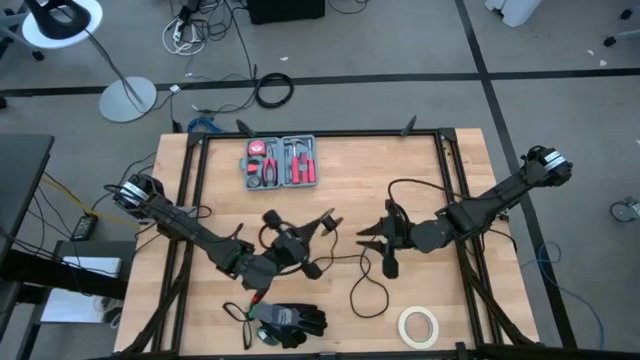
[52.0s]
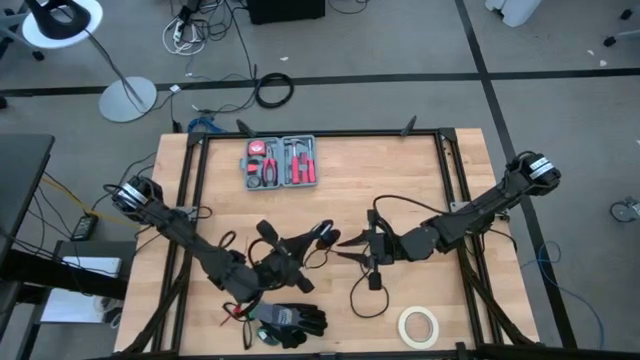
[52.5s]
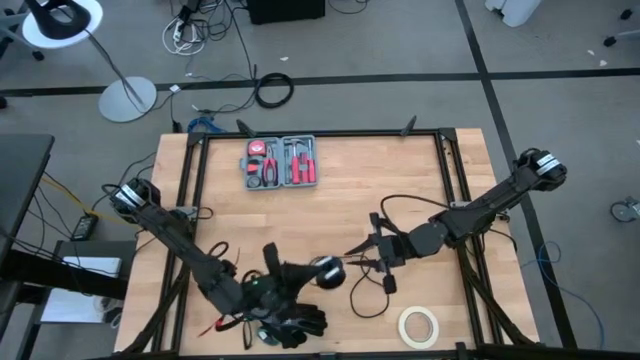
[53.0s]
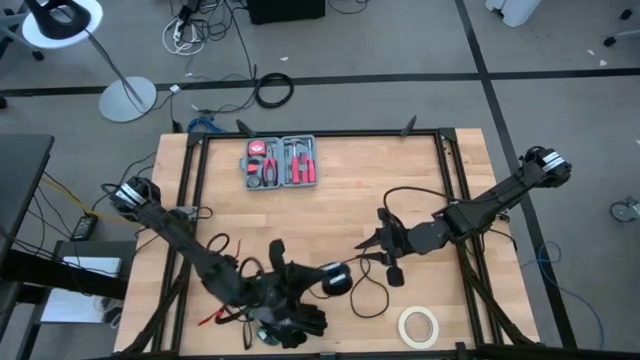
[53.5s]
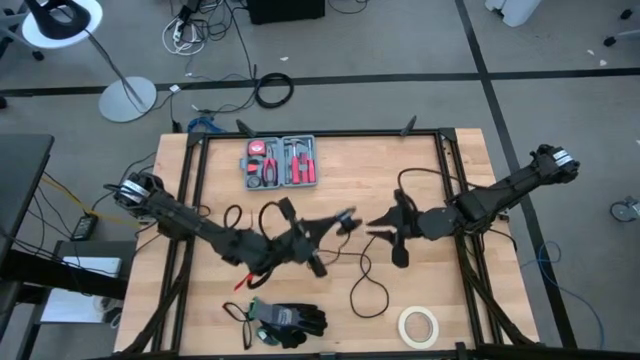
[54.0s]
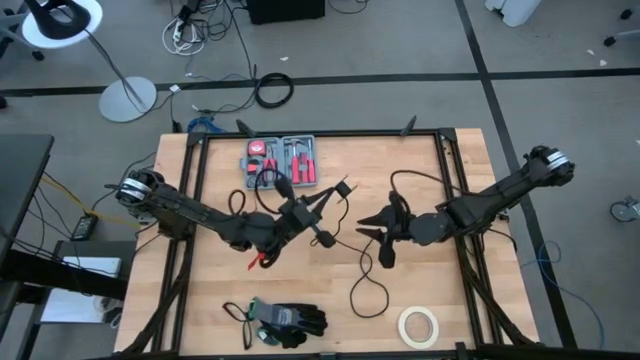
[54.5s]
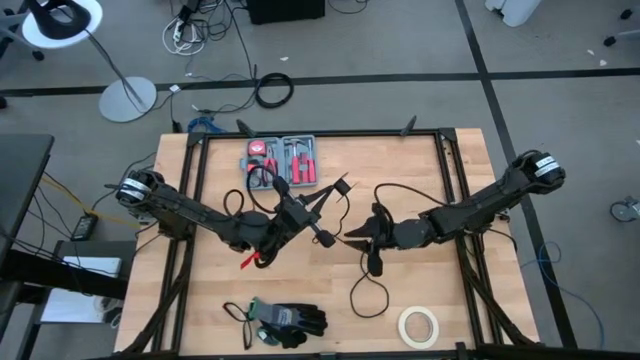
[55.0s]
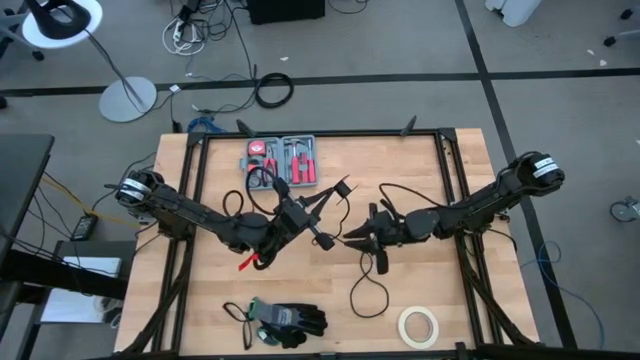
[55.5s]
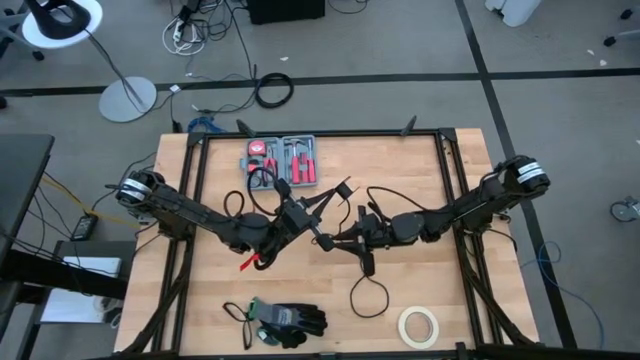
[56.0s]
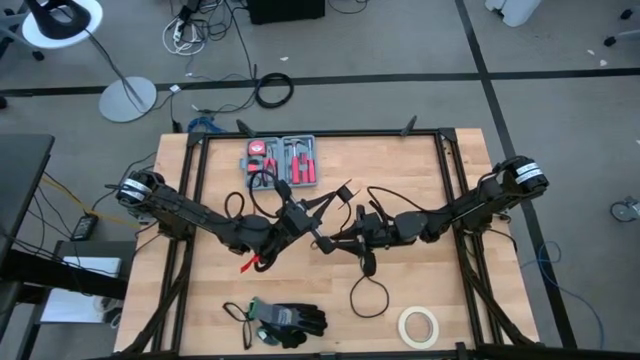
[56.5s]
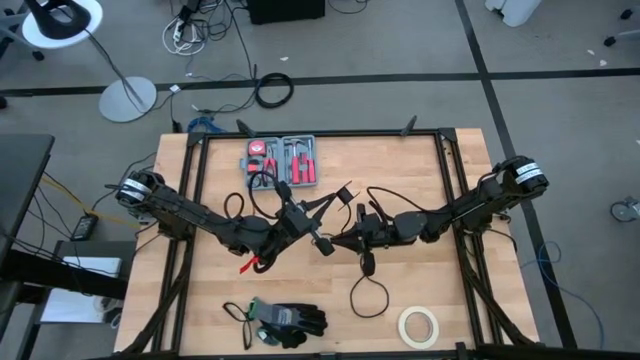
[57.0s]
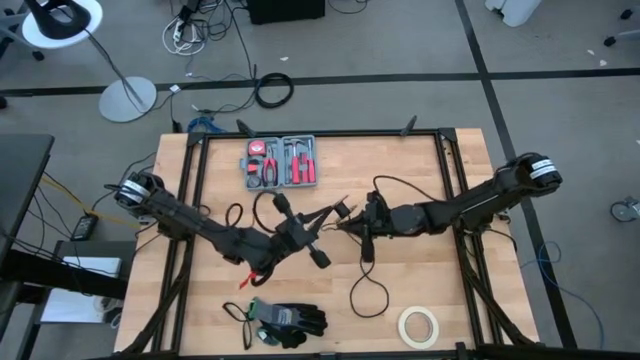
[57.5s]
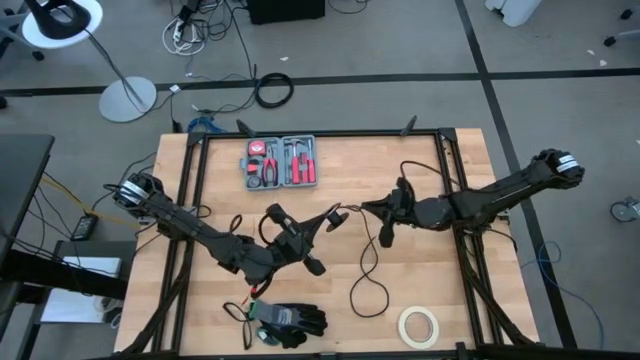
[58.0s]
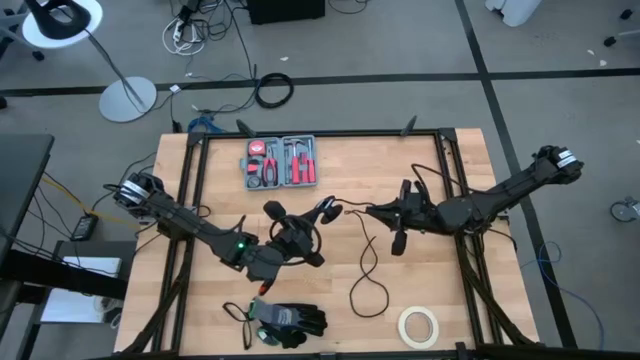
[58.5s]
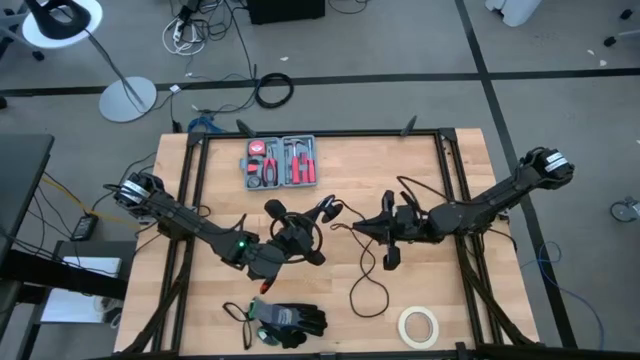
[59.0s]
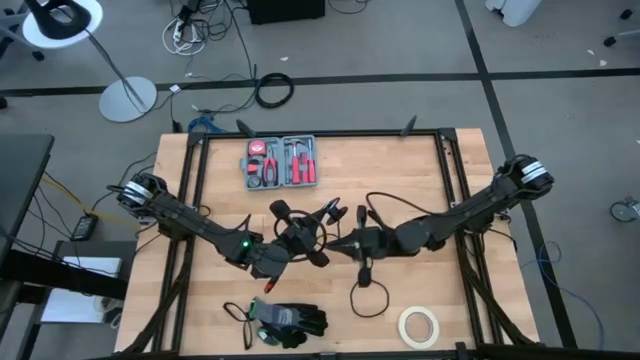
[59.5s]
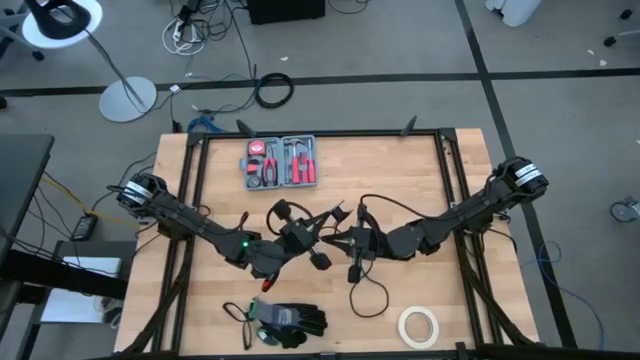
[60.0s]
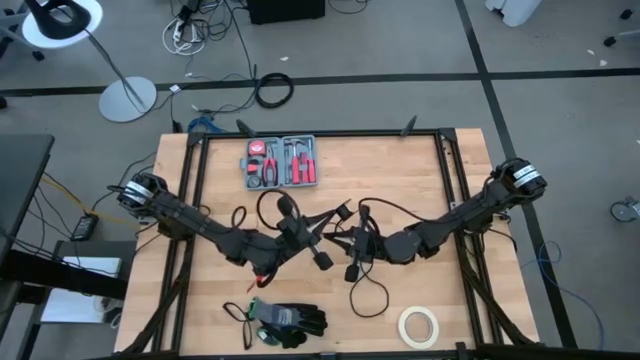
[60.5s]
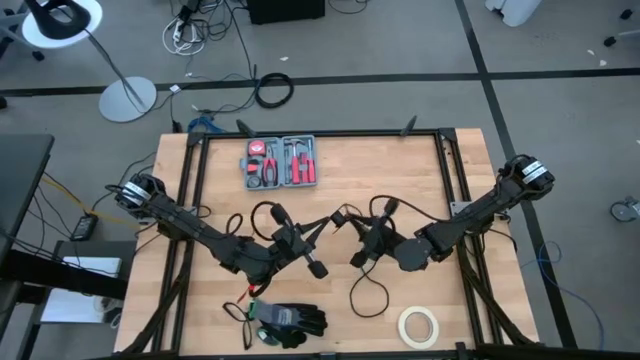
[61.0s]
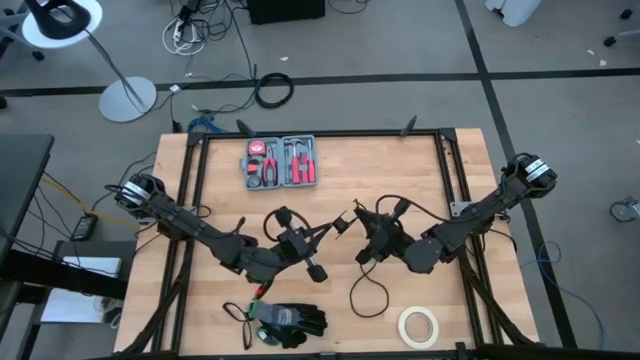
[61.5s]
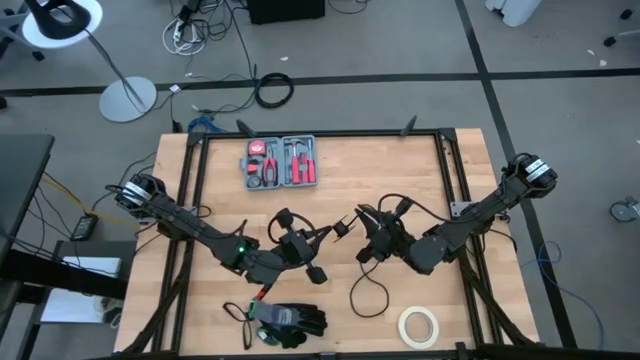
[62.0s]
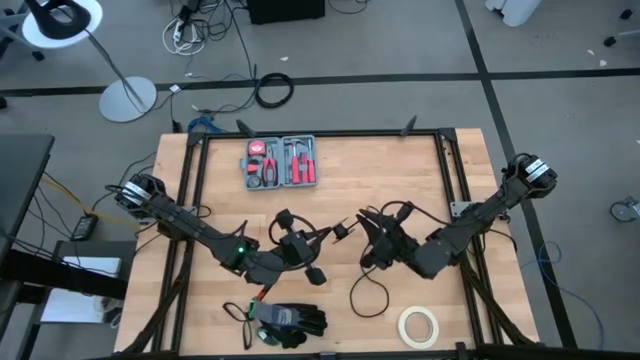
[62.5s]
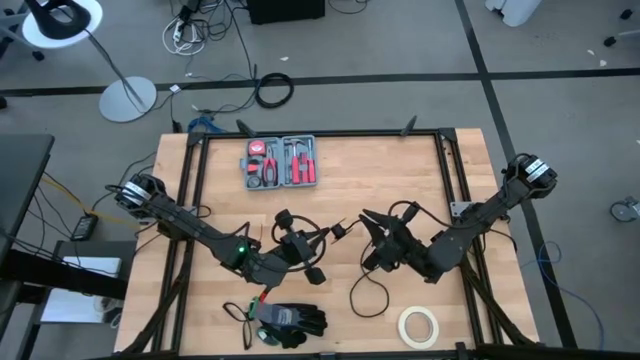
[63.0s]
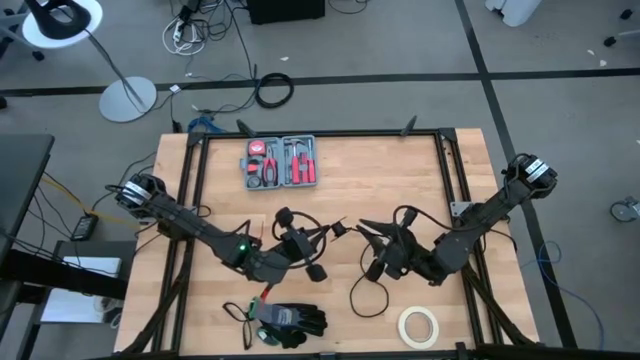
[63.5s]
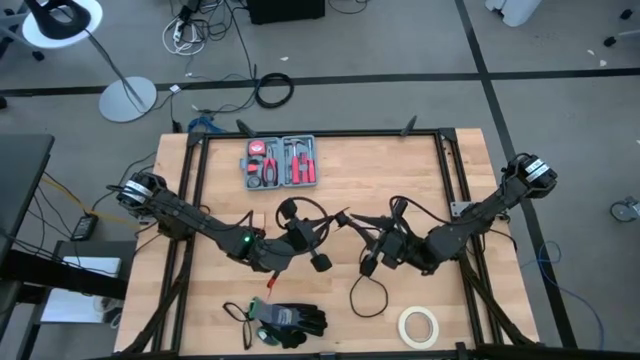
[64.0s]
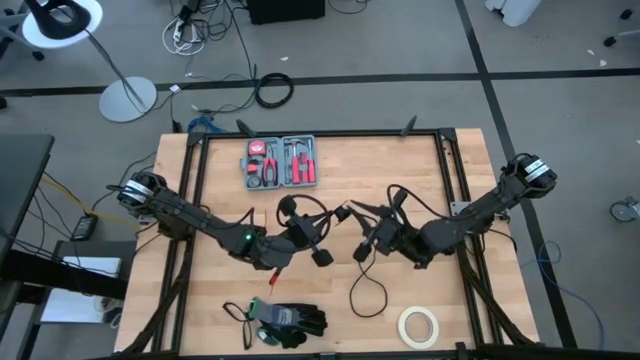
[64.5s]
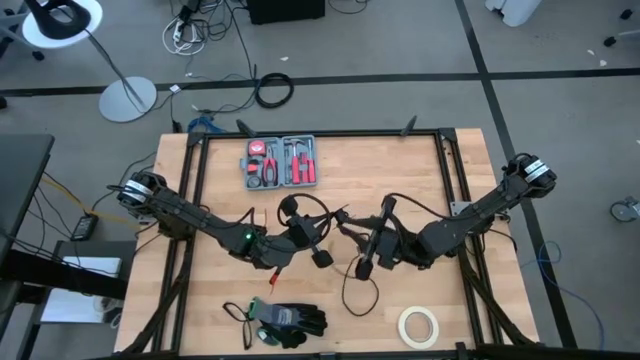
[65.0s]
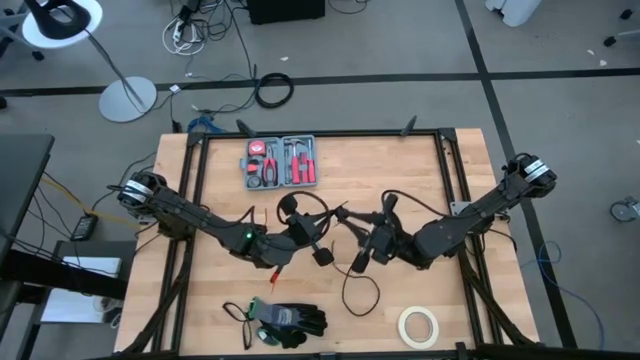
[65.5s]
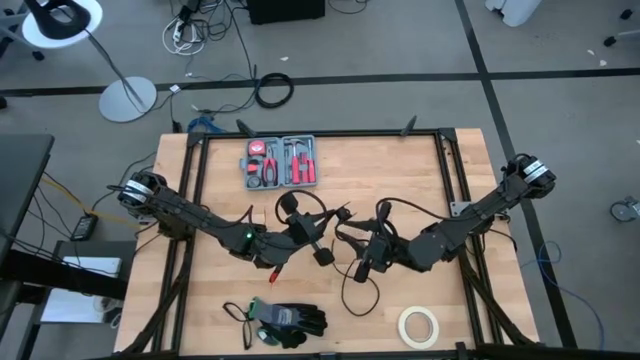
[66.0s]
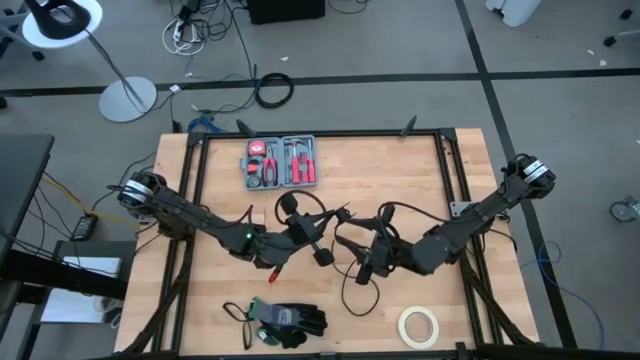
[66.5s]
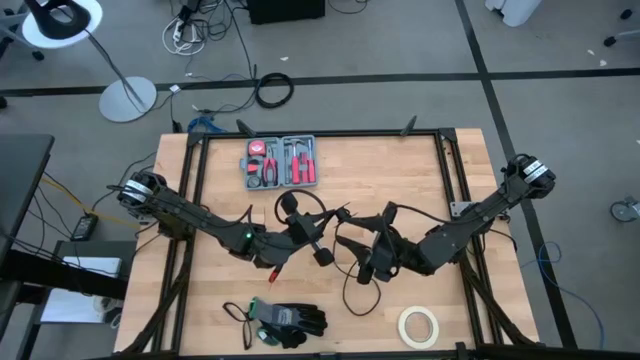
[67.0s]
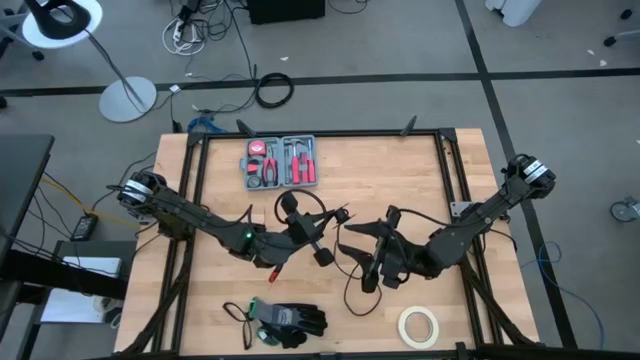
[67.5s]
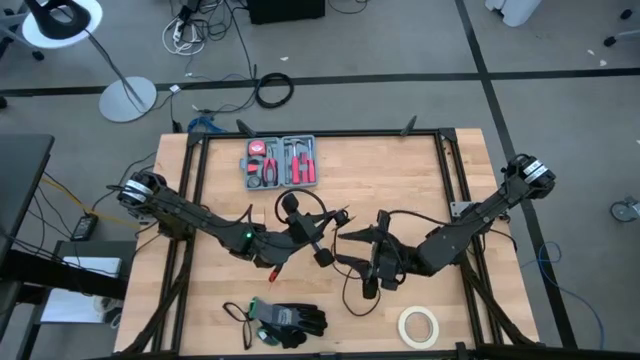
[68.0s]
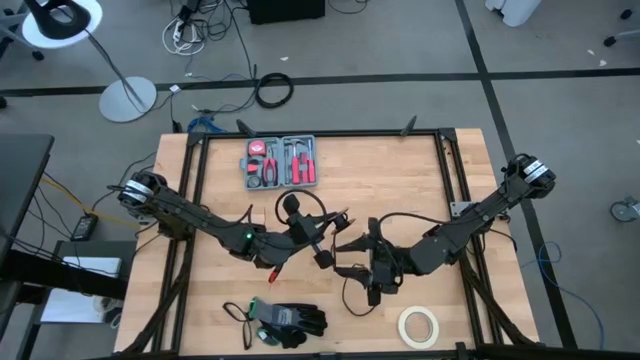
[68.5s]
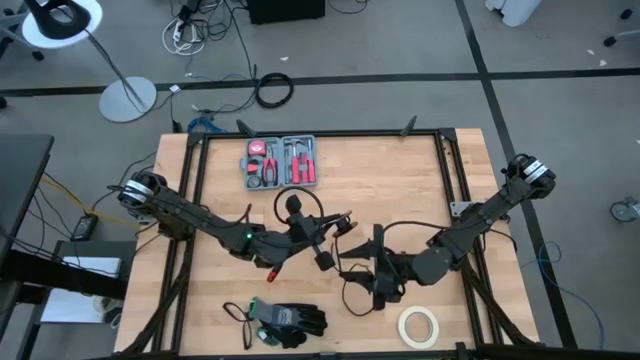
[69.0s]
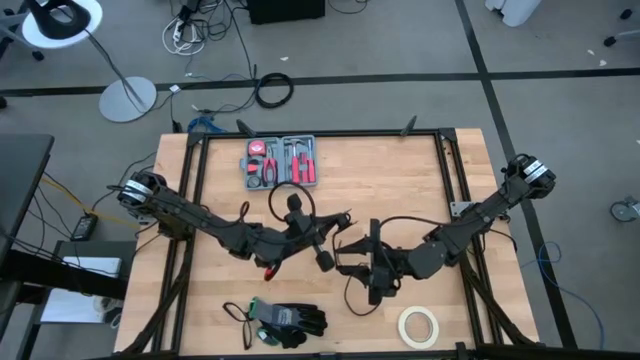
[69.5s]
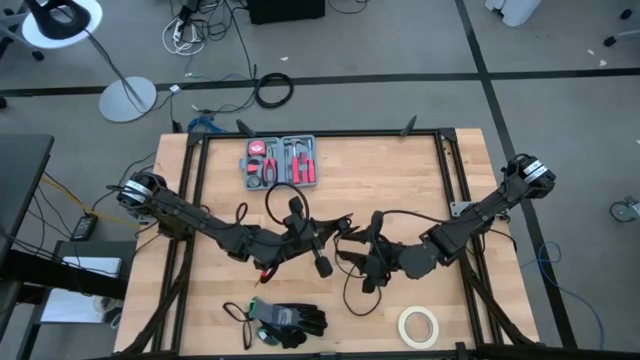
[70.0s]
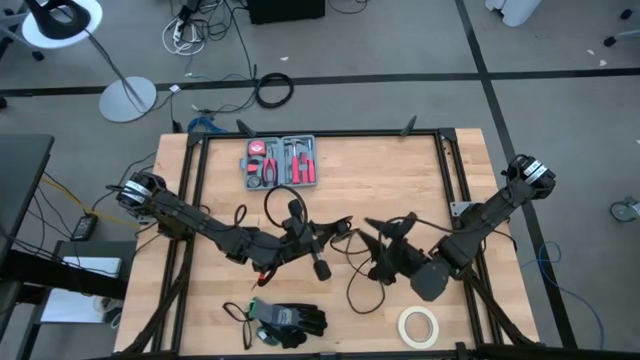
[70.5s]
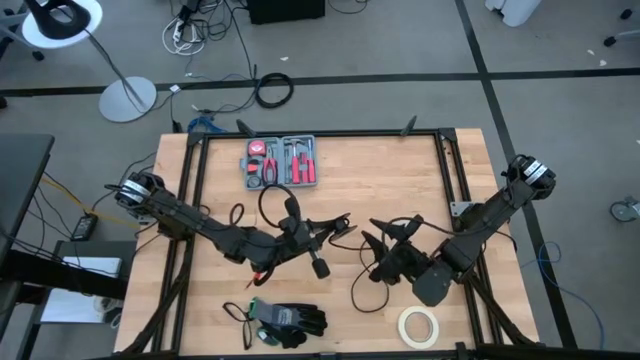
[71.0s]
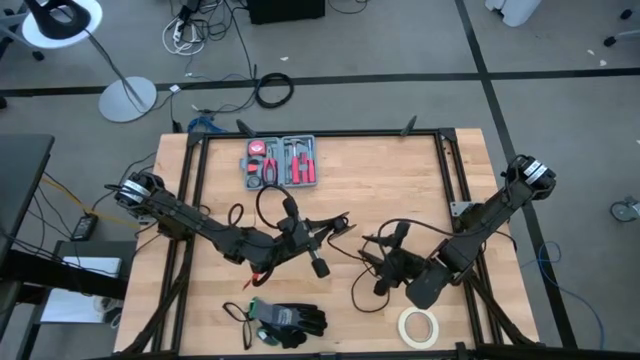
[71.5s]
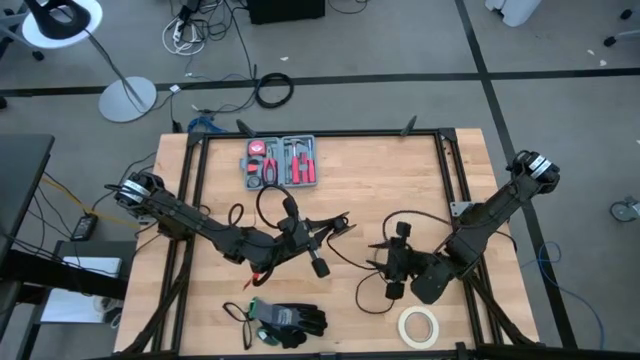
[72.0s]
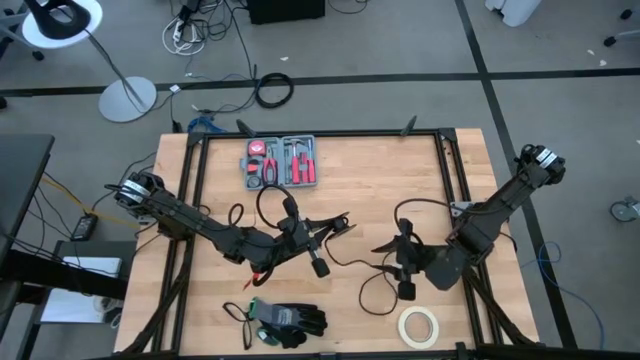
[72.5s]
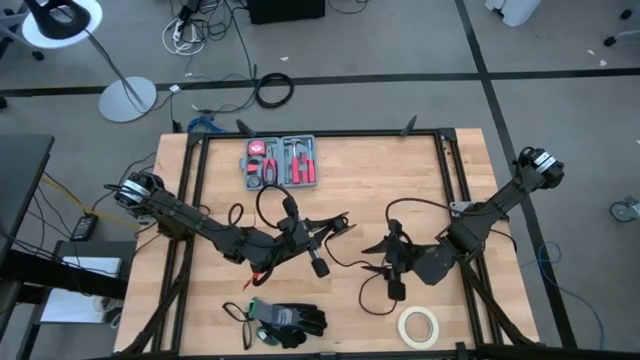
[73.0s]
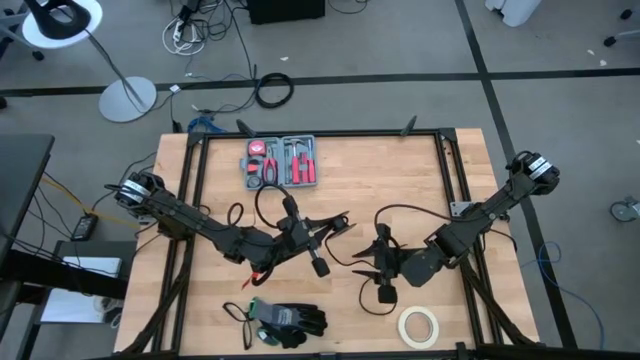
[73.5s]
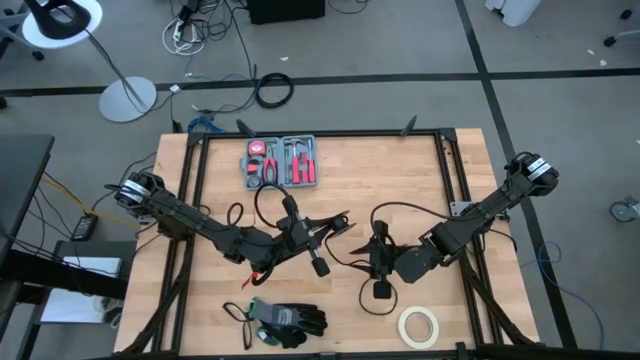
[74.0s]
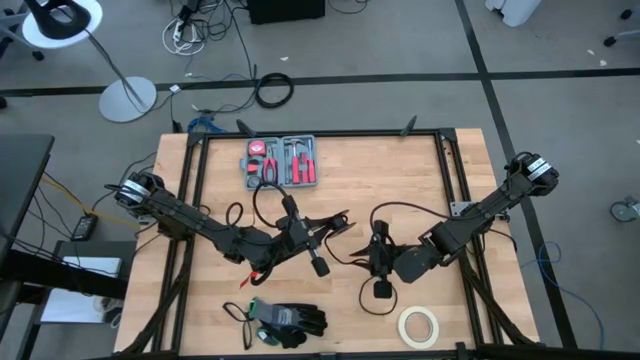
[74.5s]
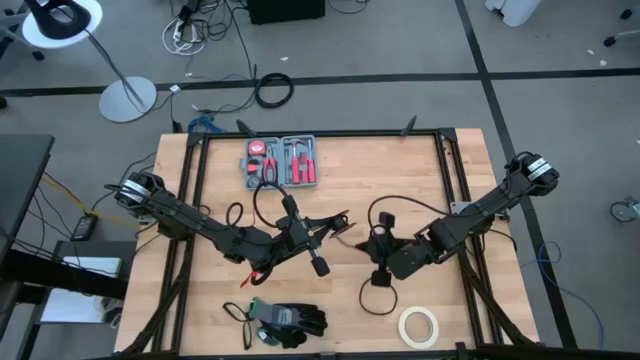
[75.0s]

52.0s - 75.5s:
Task: Coil cords
Coil the black wire cable into the black spool
